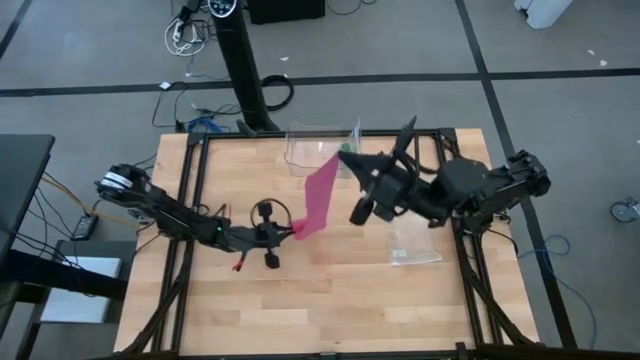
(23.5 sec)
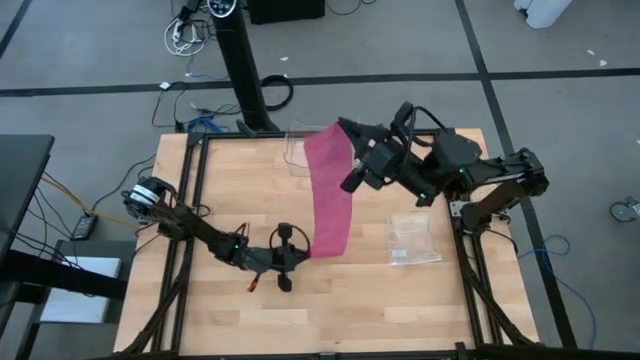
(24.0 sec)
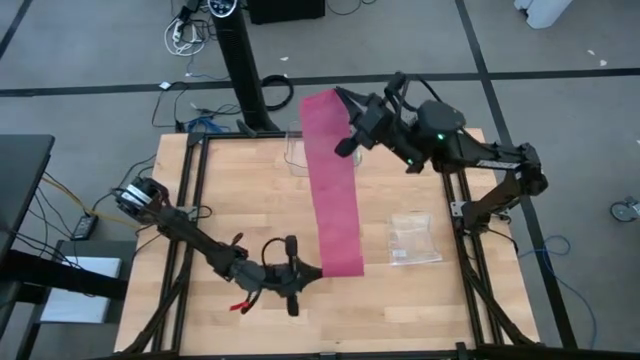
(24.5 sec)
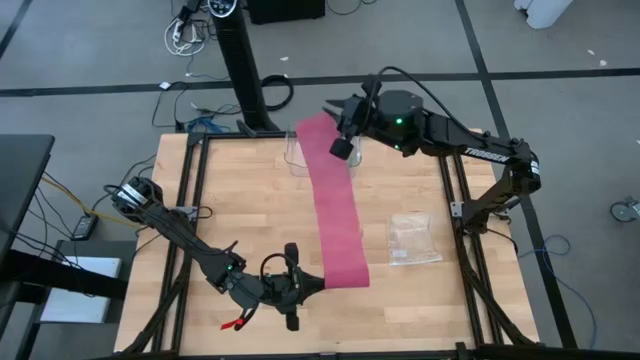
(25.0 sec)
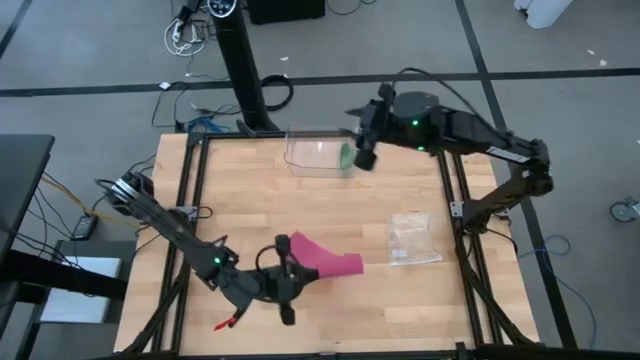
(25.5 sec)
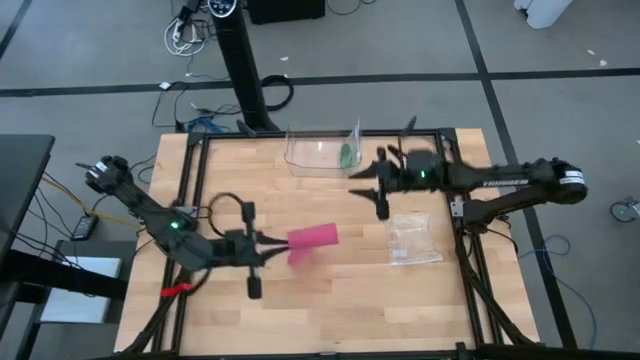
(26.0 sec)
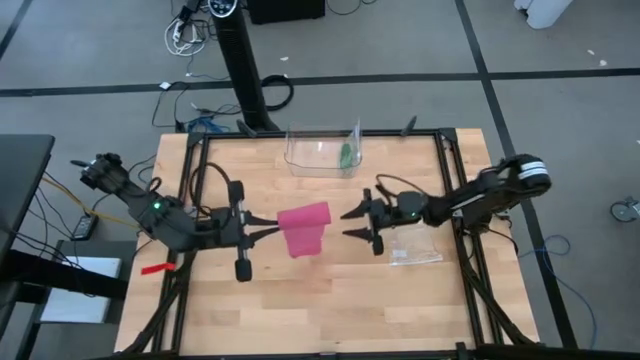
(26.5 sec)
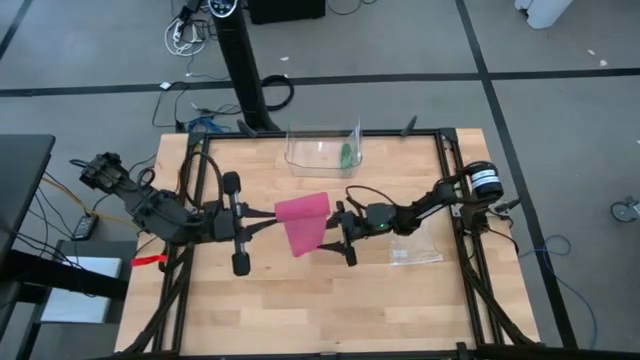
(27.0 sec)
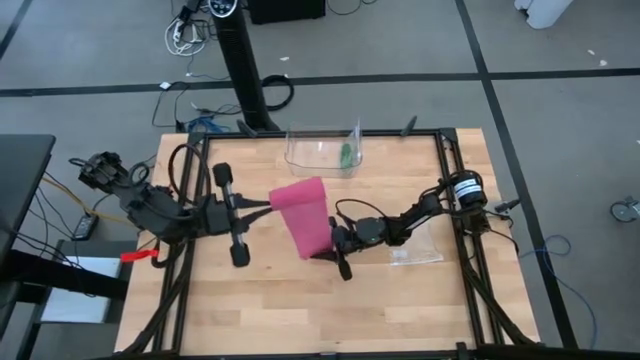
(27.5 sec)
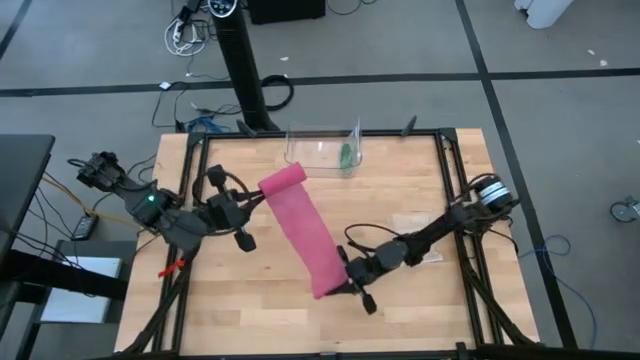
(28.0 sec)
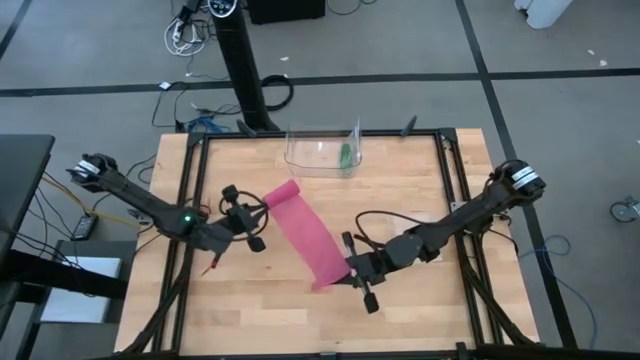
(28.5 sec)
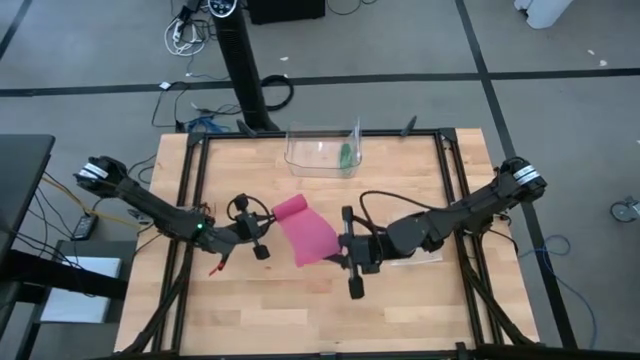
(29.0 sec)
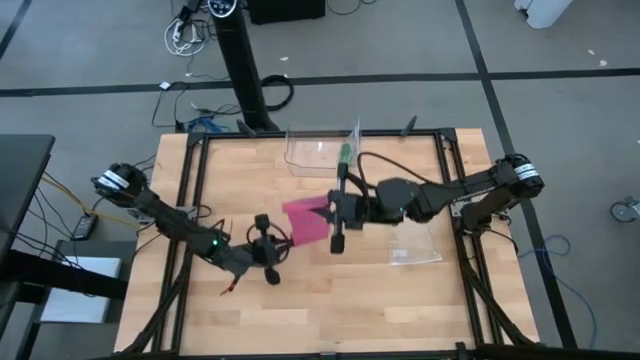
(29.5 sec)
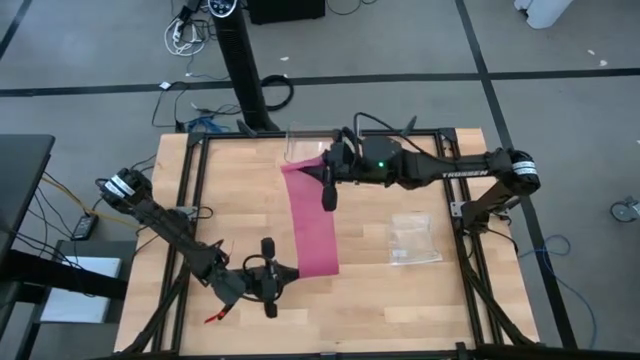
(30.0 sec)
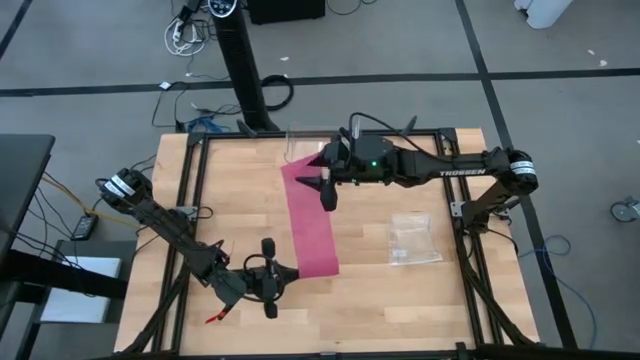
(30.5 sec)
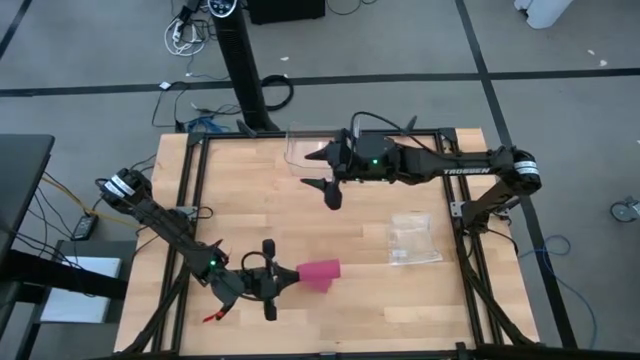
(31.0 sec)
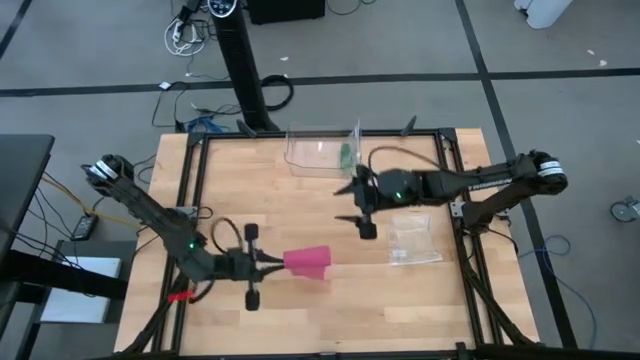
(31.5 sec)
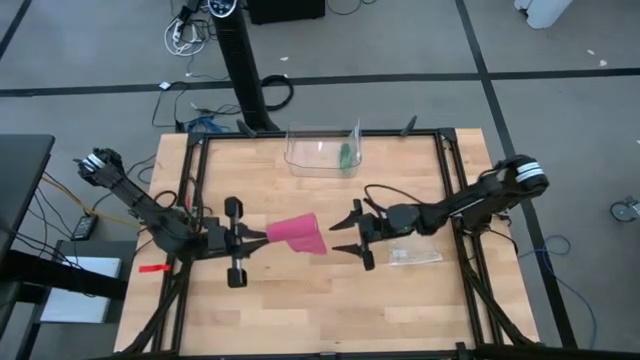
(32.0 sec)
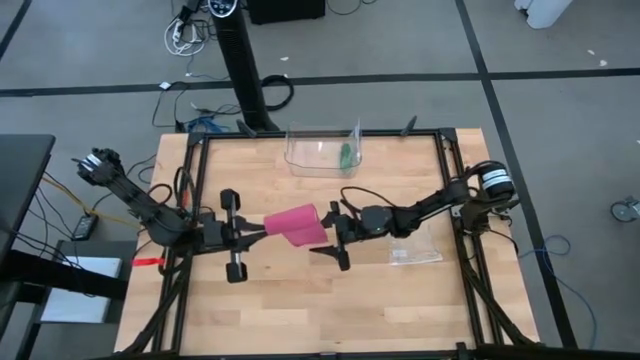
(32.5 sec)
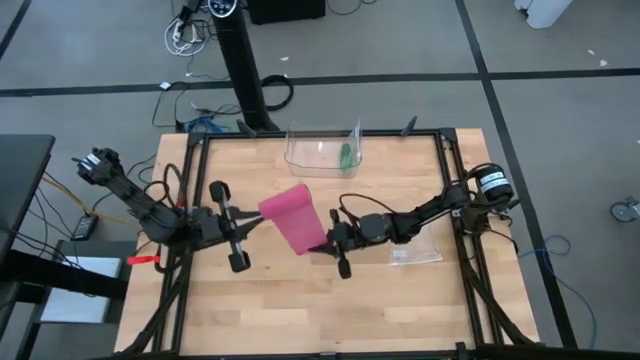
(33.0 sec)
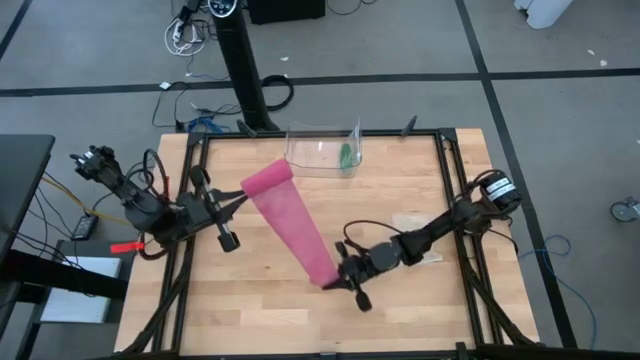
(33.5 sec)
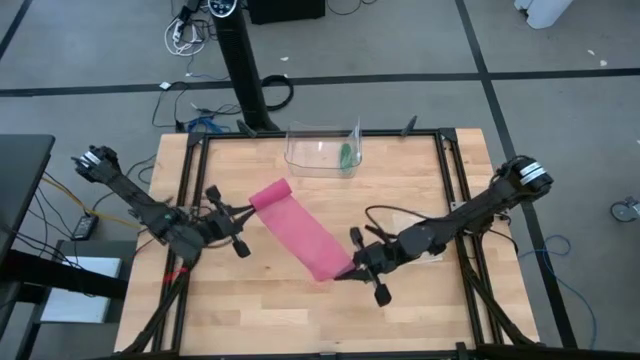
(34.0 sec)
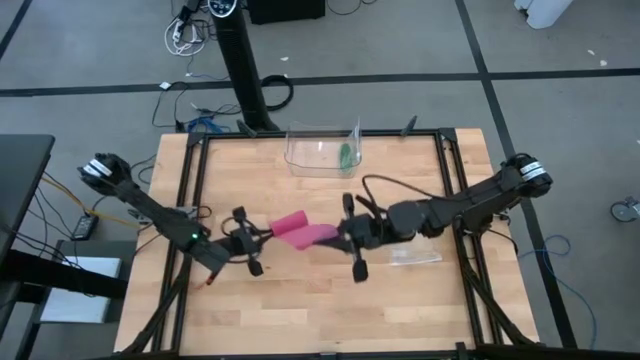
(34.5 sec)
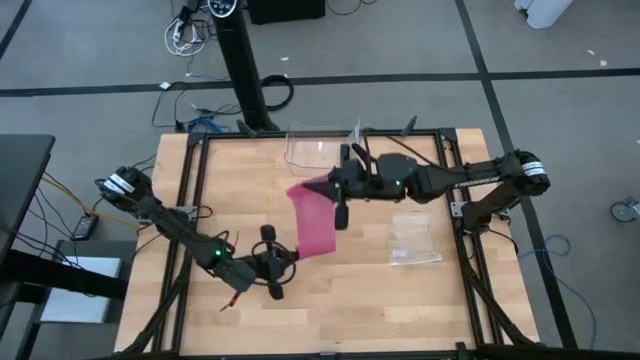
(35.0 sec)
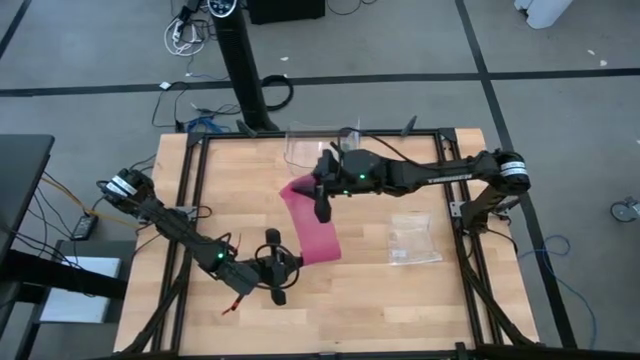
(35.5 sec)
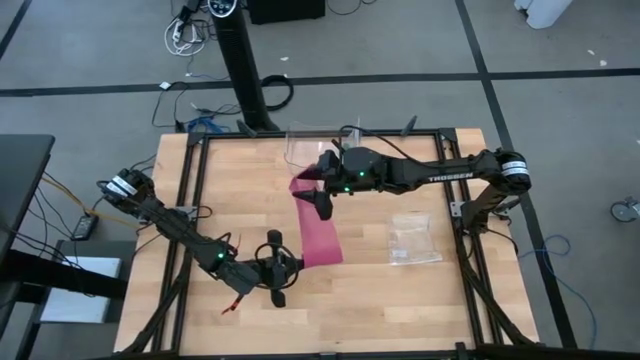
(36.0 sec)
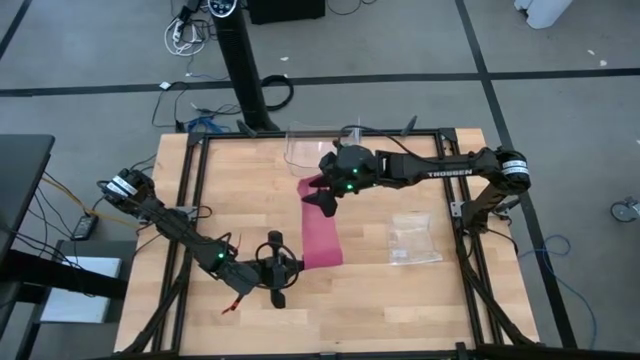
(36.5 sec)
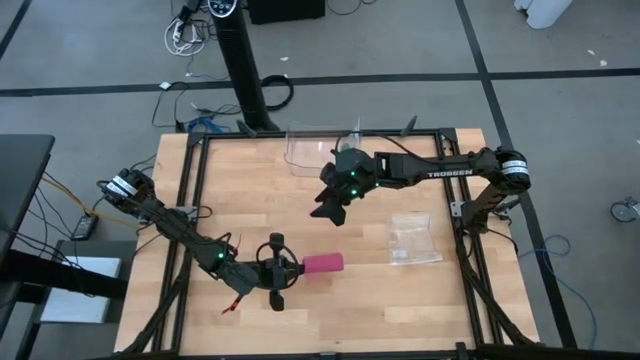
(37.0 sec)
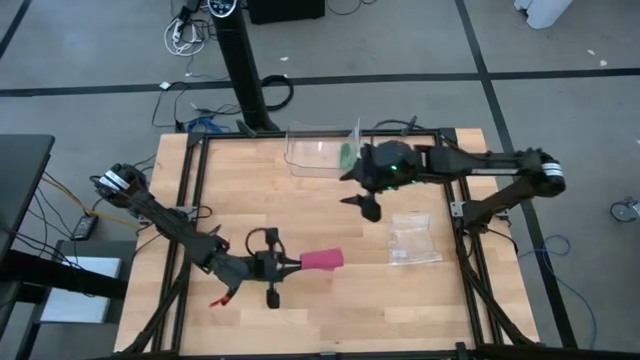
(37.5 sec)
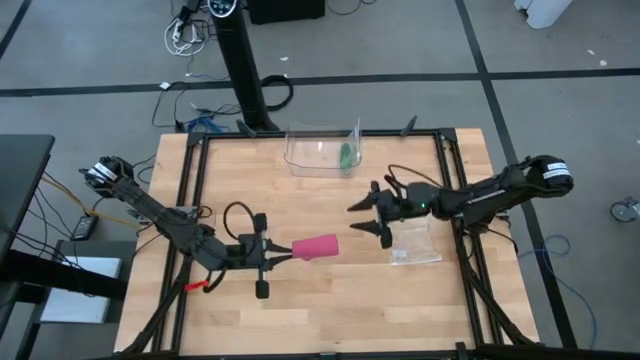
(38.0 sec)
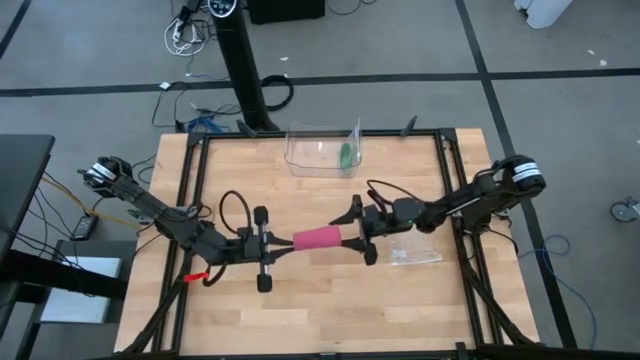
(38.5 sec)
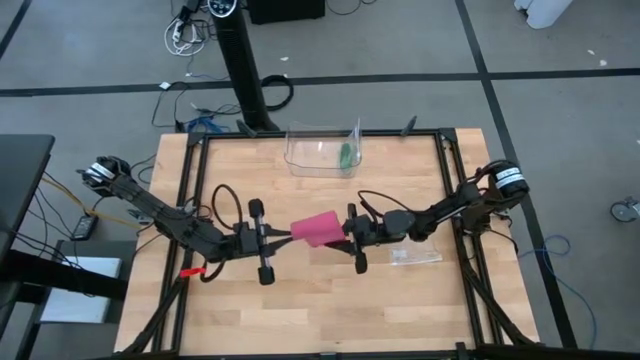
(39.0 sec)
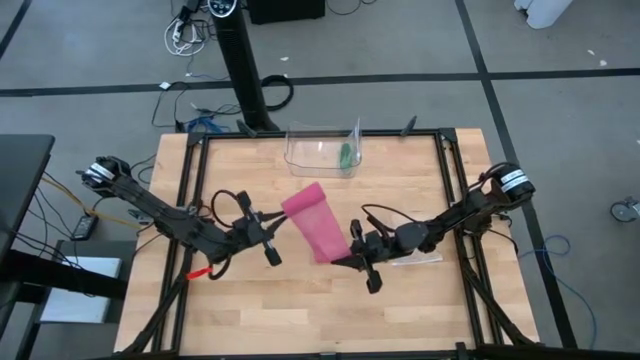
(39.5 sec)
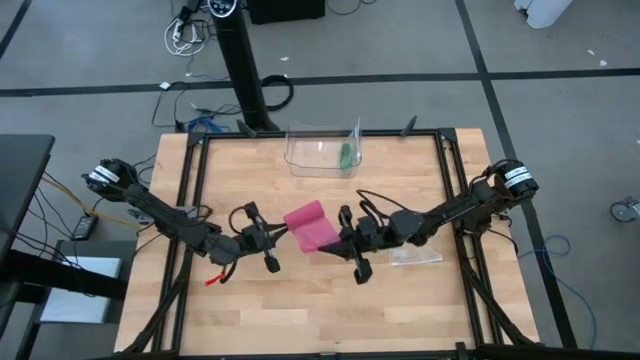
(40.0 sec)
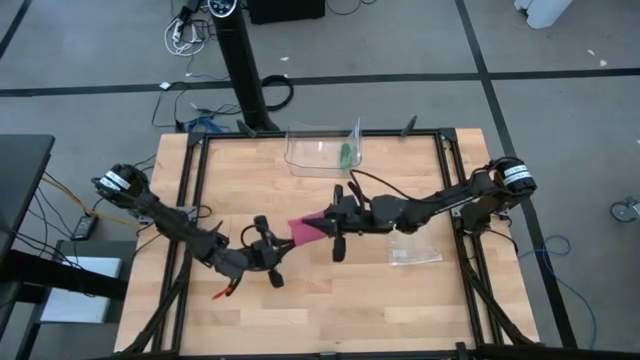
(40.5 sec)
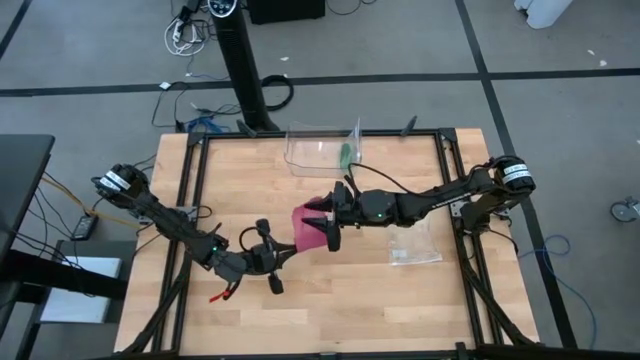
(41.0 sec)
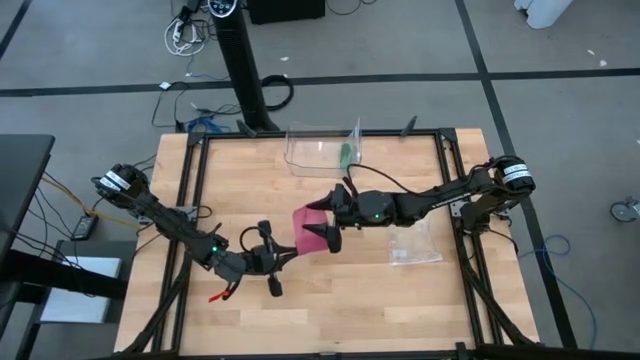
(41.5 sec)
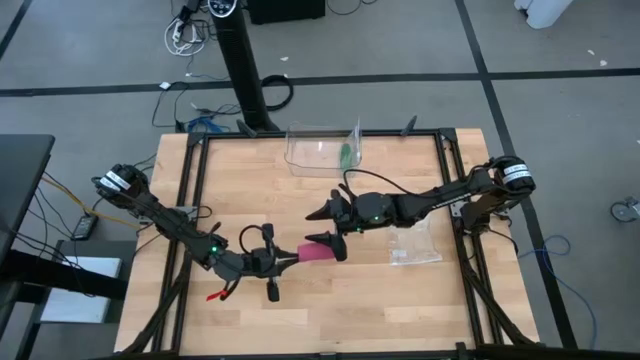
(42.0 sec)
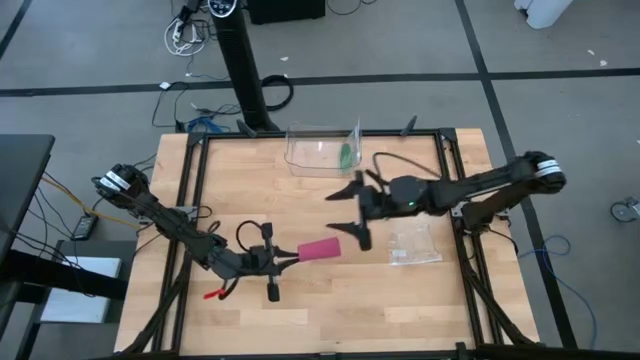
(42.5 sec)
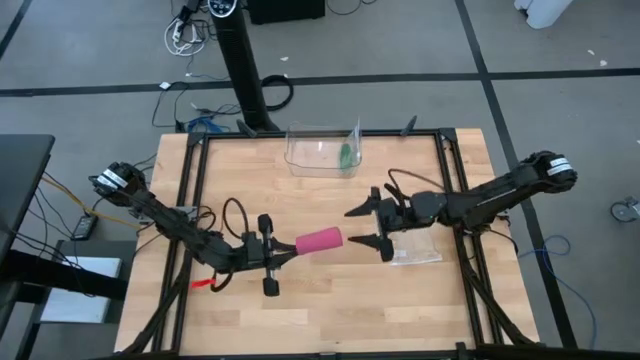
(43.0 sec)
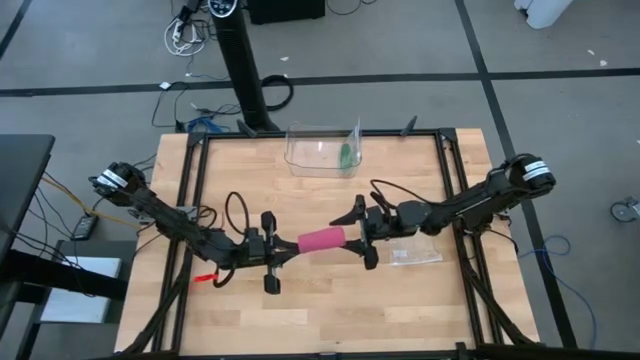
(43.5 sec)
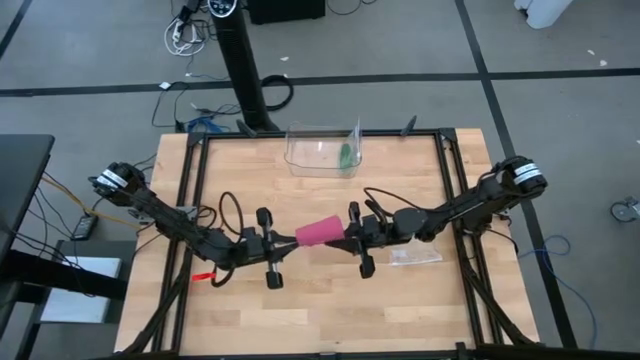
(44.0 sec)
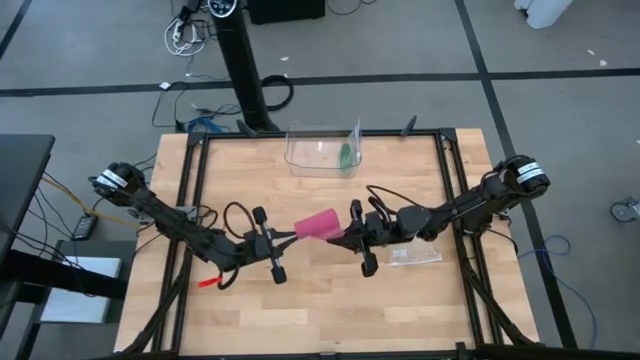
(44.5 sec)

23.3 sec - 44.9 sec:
Task: Roll bandage
Roll the pink bandage

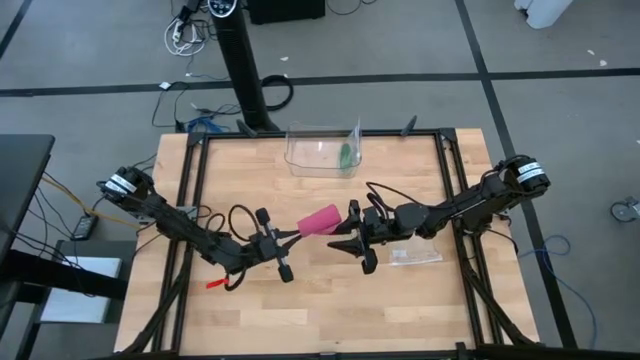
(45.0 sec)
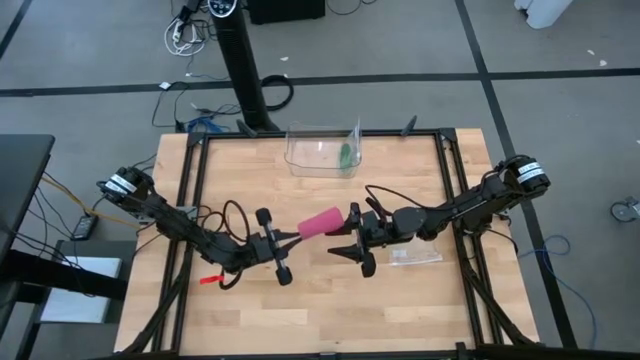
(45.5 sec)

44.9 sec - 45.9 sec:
Roll the pink bandage
